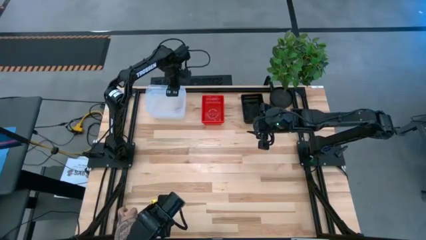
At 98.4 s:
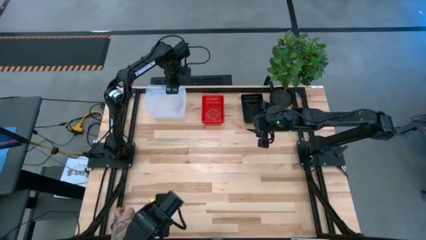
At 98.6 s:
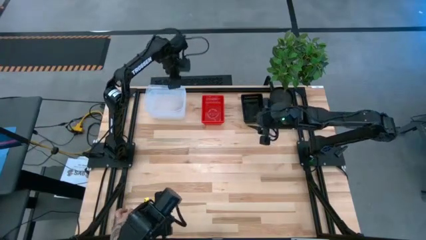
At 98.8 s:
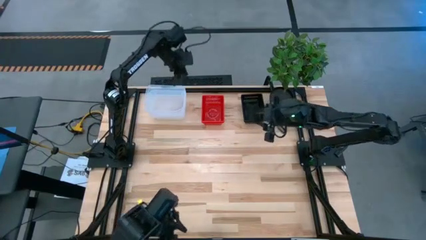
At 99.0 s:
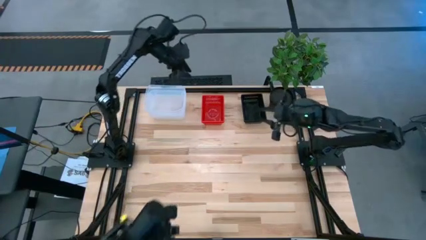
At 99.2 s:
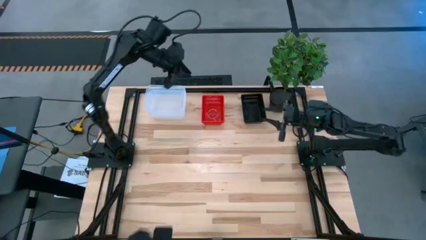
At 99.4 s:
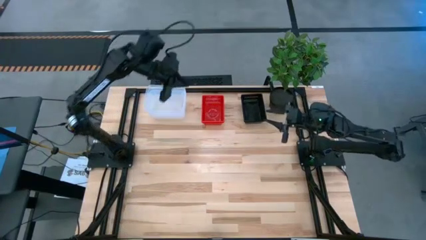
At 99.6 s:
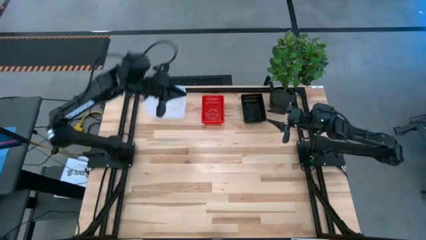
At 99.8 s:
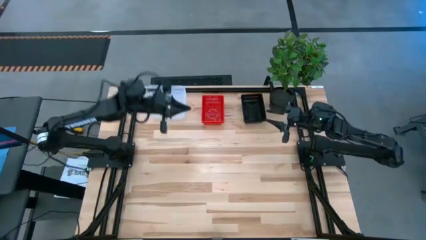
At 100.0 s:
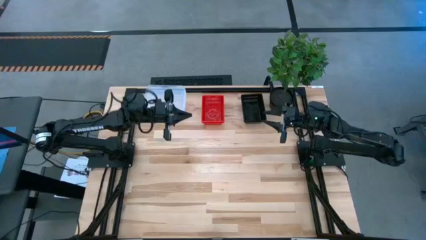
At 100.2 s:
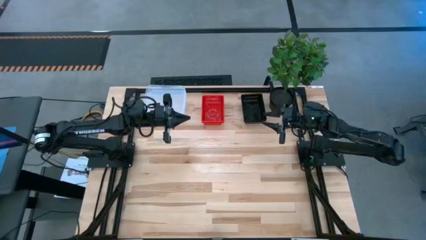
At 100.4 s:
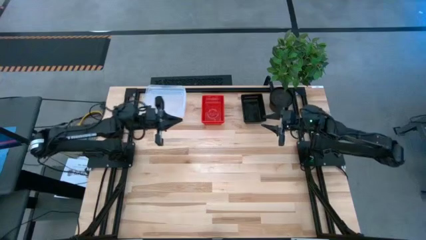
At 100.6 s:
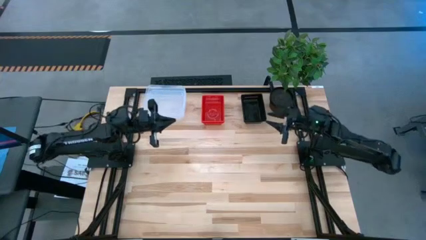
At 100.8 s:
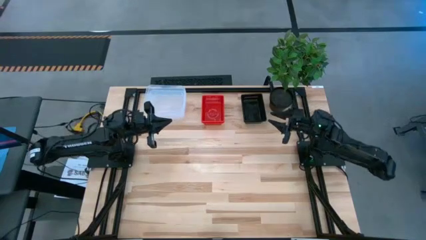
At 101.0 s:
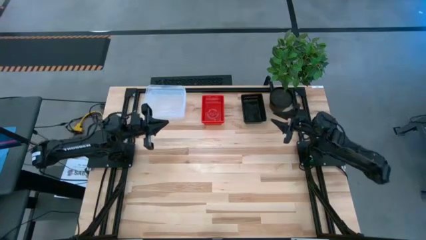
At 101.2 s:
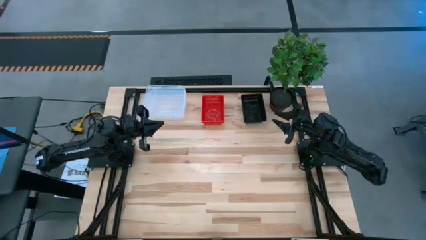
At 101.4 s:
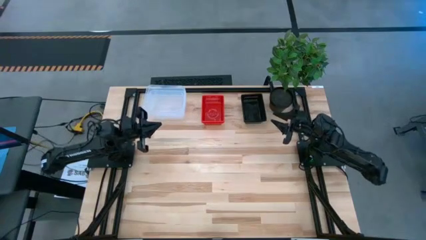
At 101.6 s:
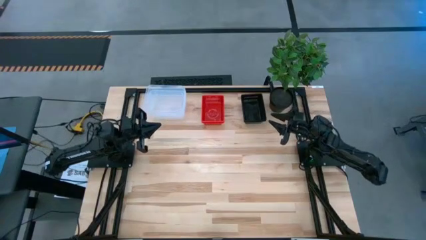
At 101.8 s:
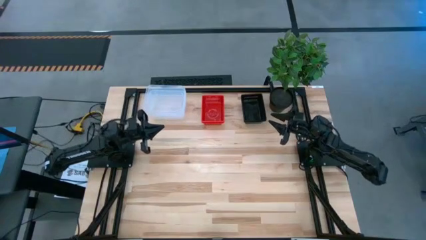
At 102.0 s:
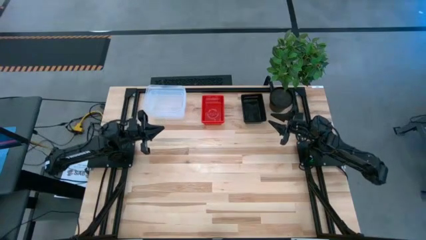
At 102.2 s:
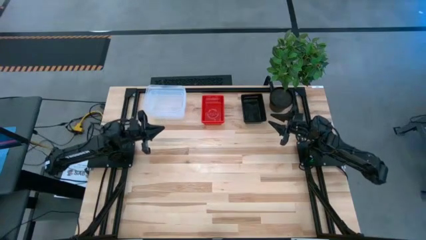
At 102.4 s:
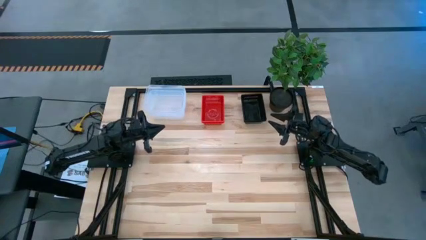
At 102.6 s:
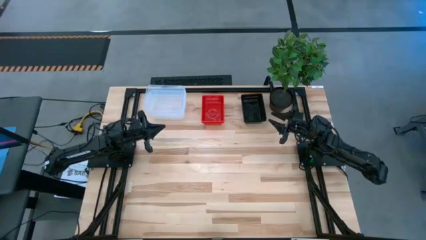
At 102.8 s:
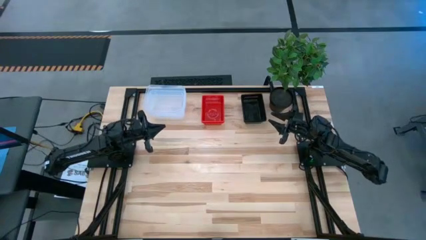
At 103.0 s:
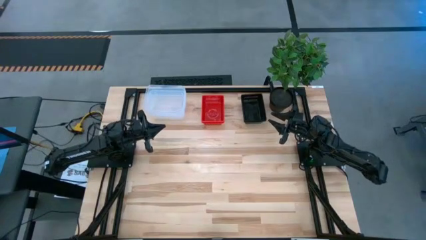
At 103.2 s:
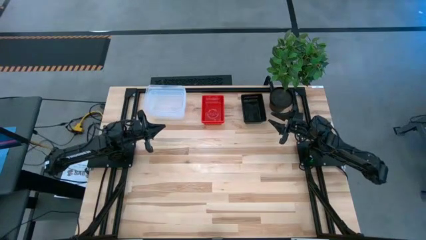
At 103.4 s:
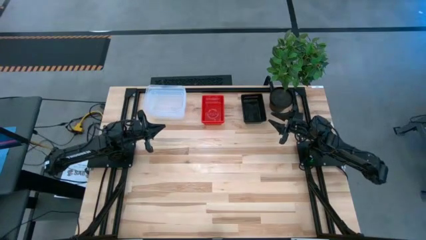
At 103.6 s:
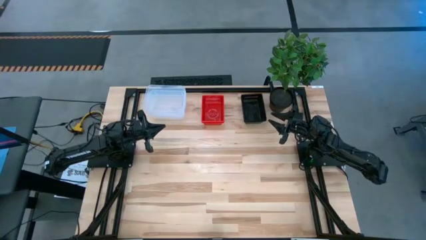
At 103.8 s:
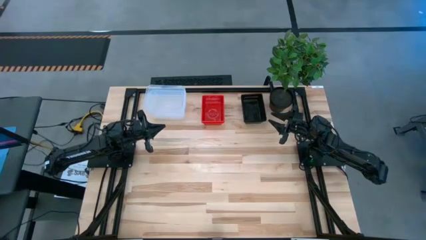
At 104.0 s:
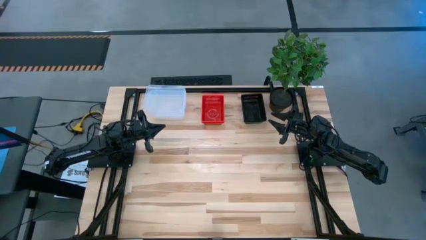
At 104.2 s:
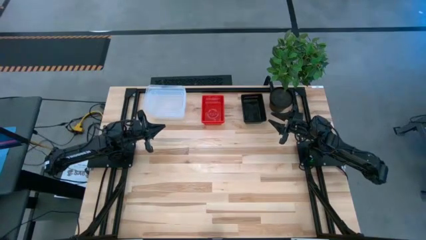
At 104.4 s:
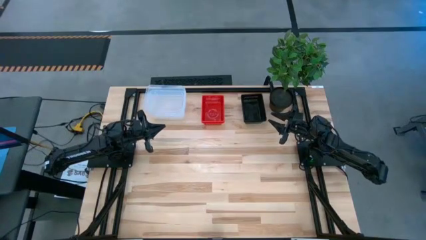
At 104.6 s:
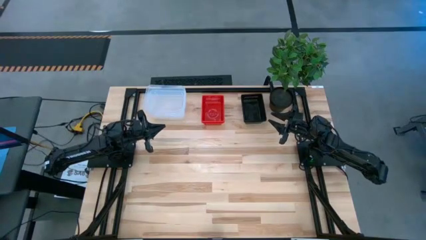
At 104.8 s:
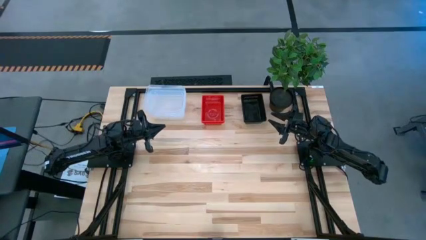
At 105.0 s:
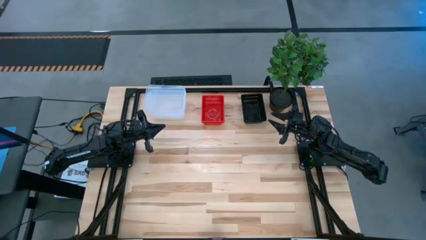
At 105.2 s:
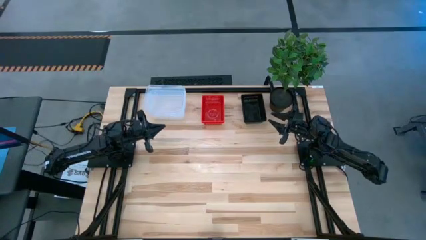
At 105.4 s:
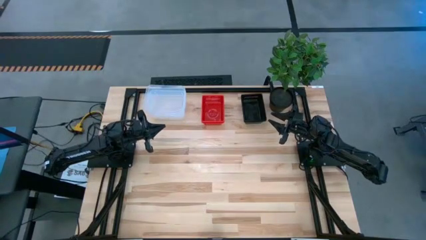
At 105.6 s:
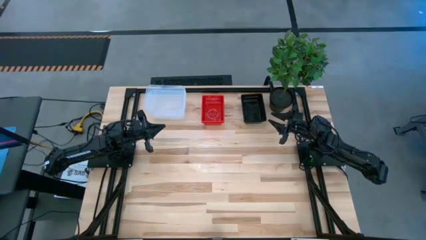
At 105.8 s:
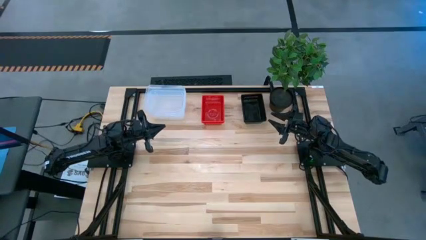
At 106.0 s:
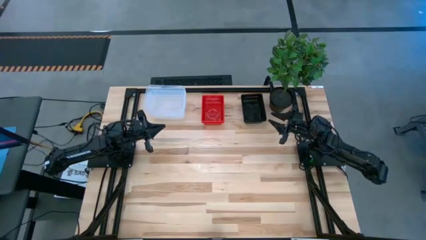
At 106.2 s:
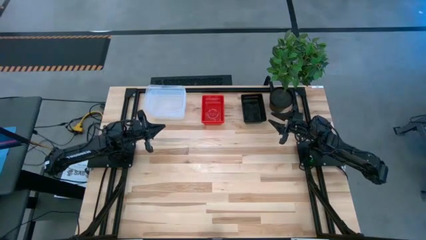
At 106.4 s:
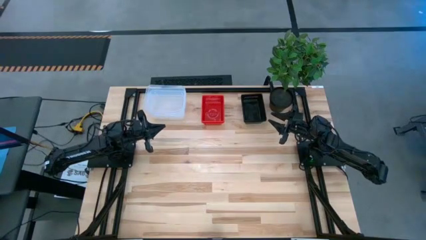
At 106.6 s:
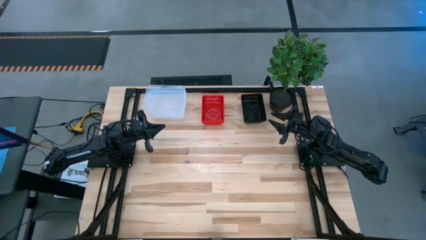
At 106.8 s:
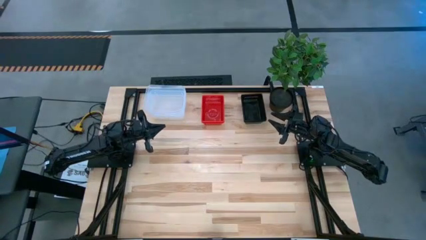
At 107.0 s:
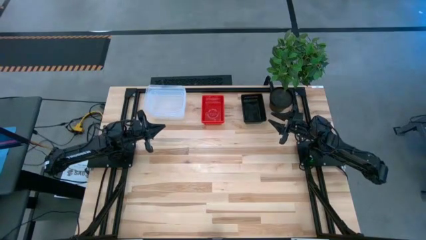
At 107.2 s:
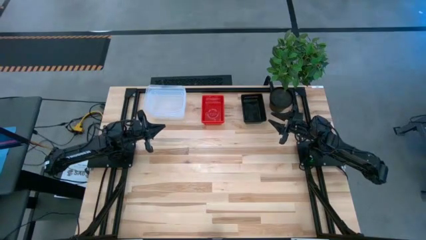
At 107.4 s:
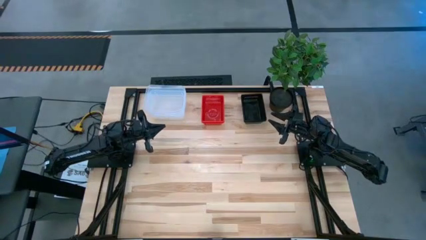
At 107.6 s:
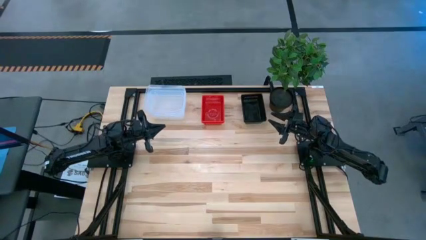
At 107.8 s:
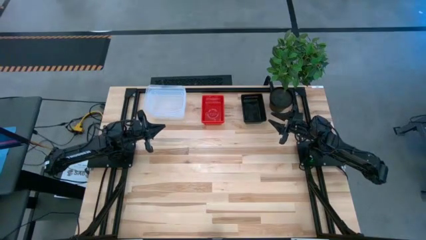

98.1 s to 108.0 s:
Return to Home Position
